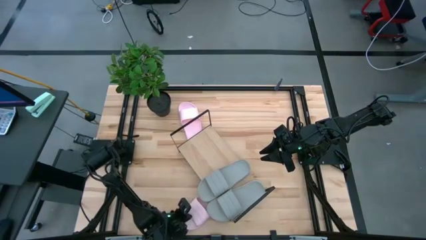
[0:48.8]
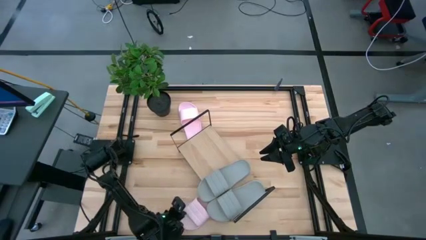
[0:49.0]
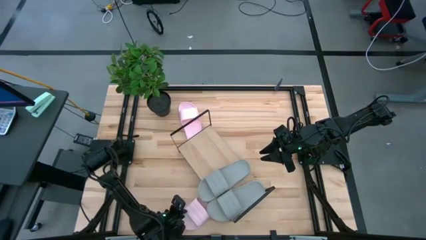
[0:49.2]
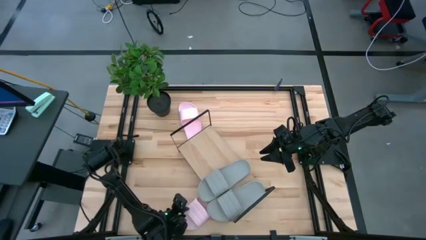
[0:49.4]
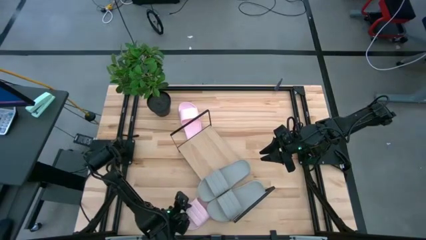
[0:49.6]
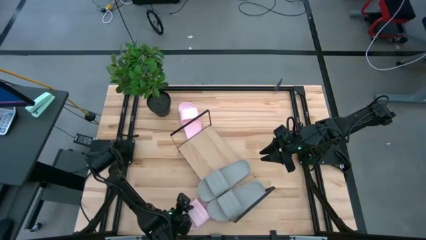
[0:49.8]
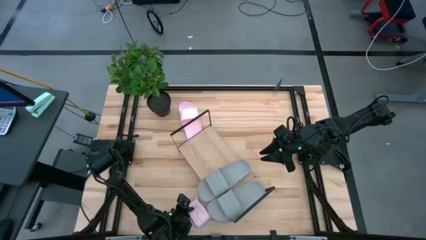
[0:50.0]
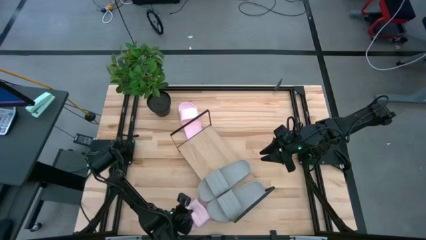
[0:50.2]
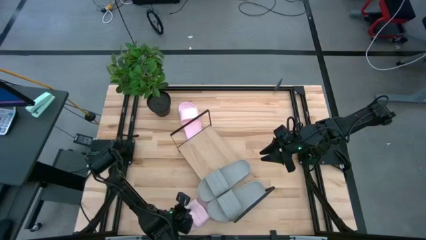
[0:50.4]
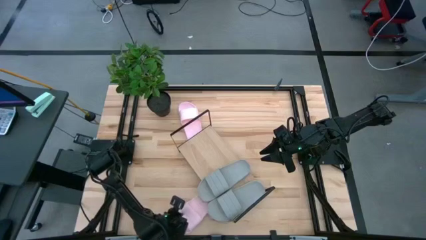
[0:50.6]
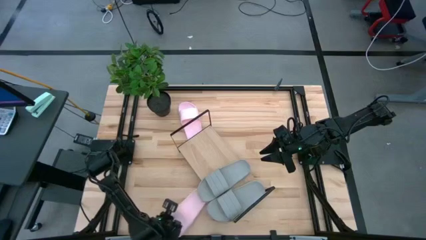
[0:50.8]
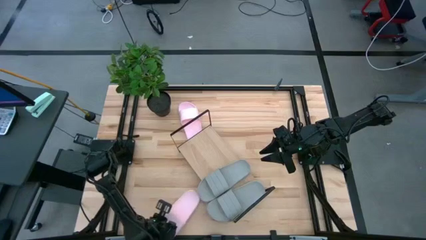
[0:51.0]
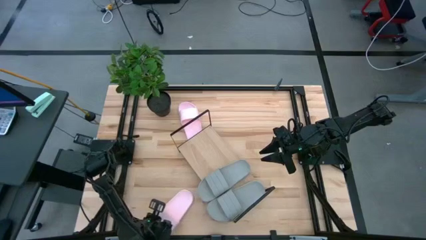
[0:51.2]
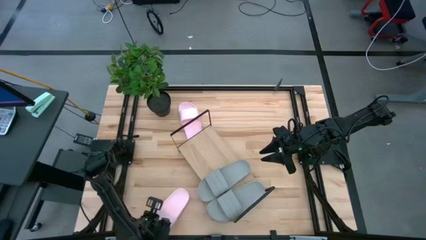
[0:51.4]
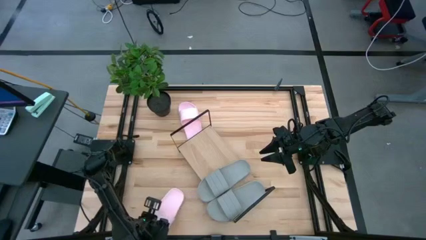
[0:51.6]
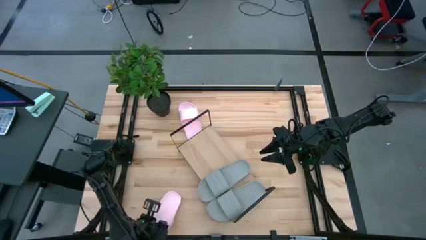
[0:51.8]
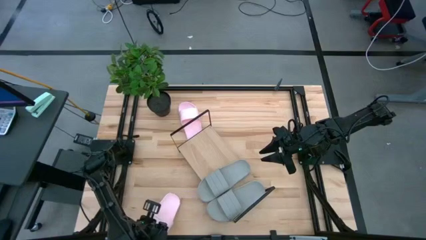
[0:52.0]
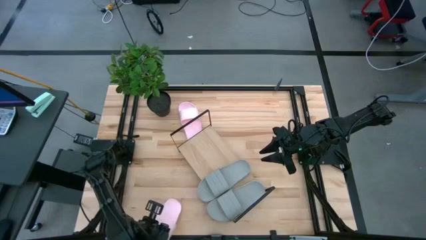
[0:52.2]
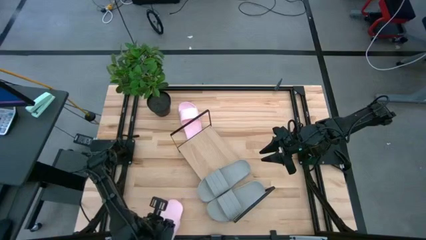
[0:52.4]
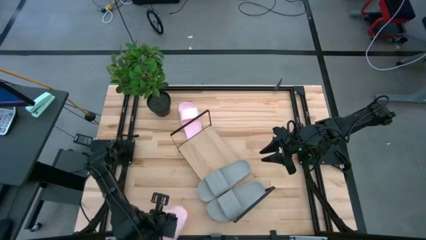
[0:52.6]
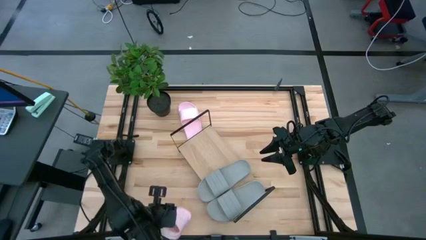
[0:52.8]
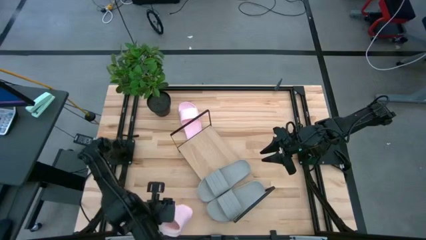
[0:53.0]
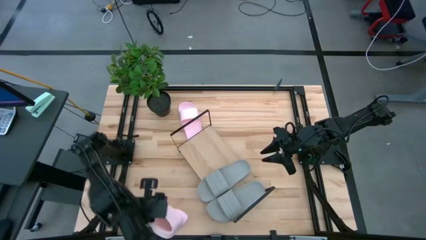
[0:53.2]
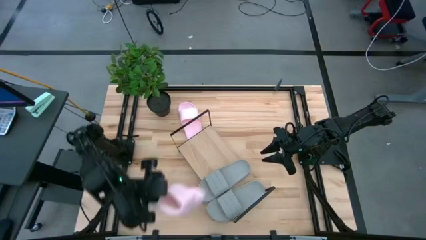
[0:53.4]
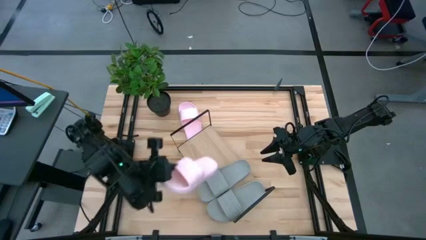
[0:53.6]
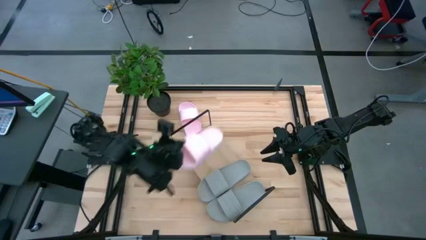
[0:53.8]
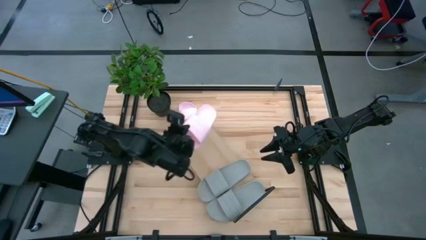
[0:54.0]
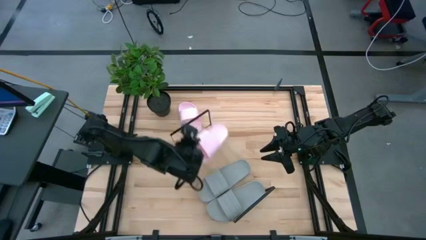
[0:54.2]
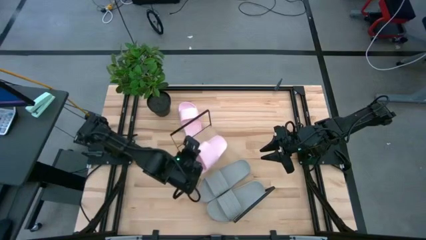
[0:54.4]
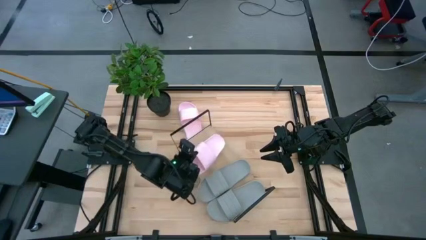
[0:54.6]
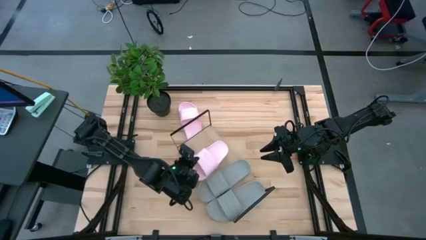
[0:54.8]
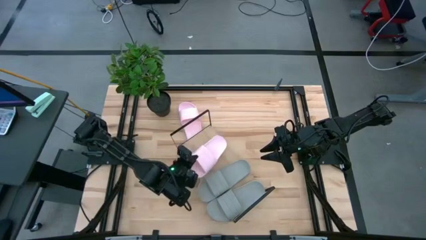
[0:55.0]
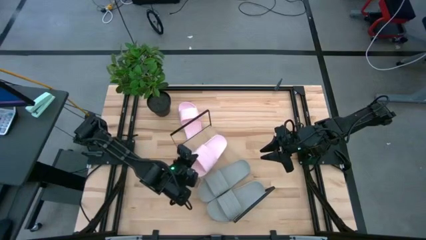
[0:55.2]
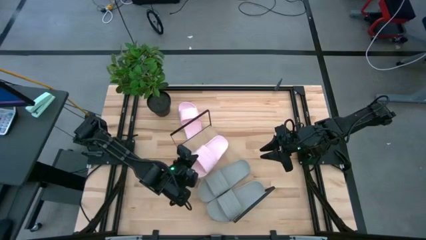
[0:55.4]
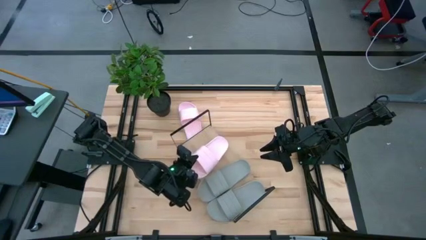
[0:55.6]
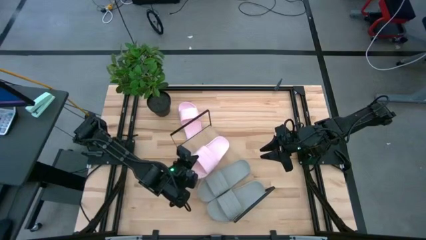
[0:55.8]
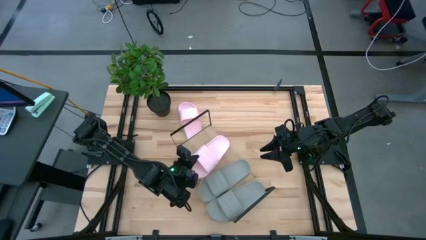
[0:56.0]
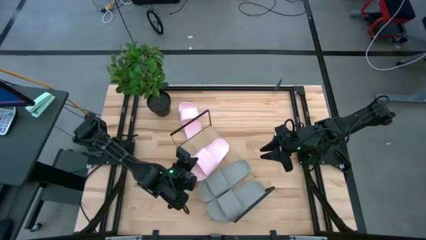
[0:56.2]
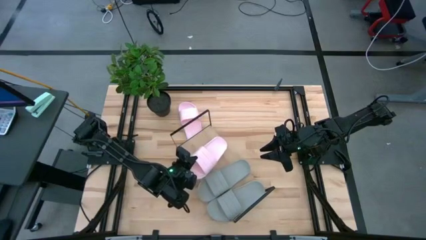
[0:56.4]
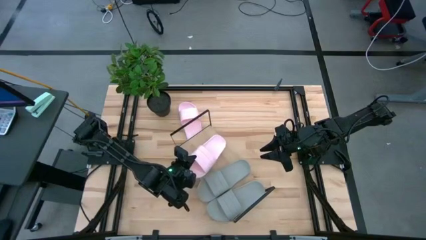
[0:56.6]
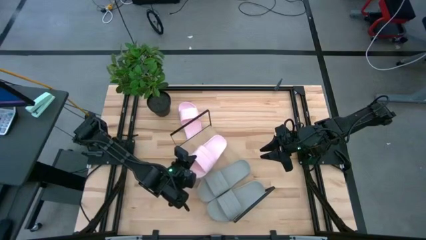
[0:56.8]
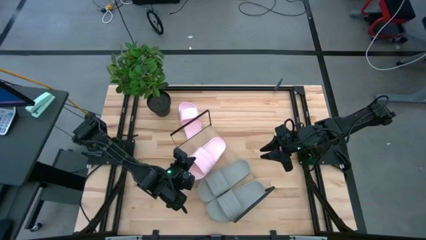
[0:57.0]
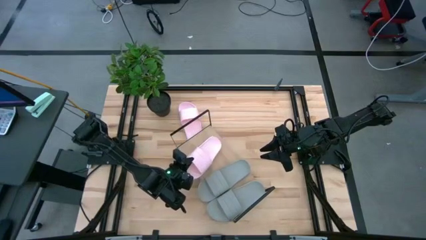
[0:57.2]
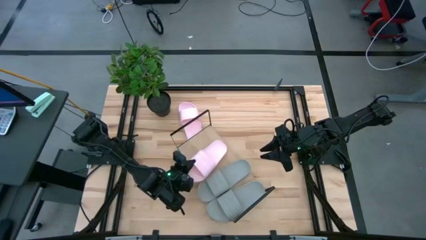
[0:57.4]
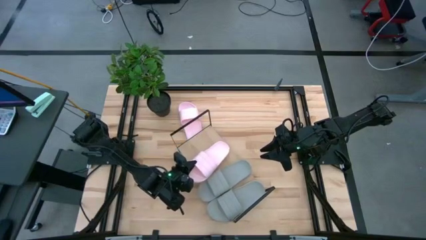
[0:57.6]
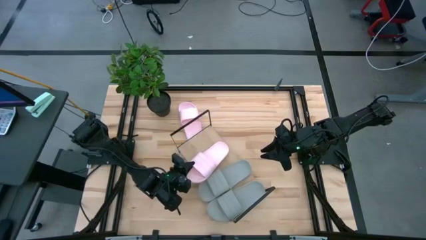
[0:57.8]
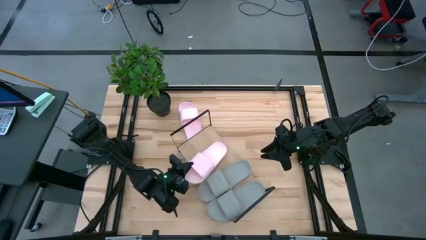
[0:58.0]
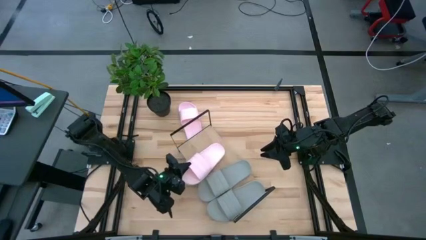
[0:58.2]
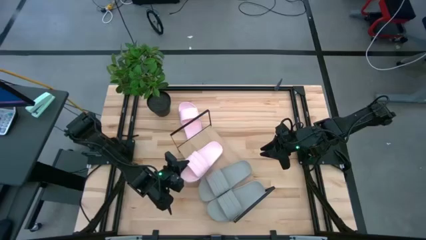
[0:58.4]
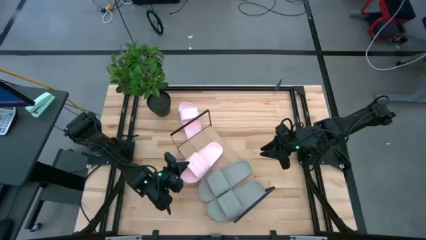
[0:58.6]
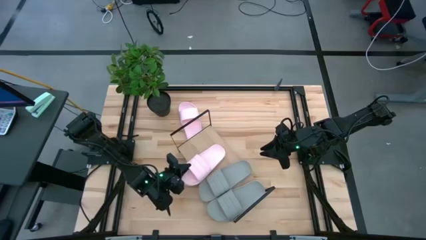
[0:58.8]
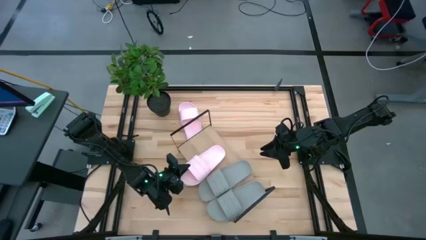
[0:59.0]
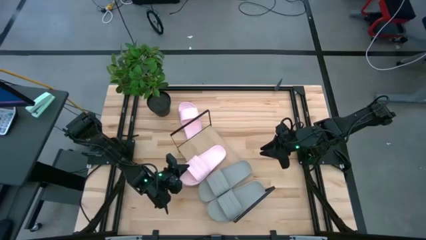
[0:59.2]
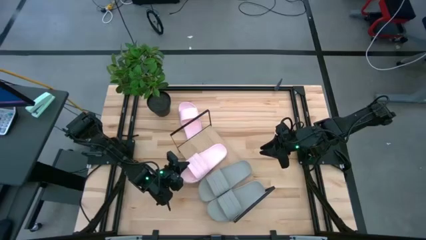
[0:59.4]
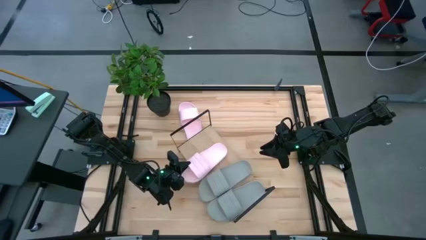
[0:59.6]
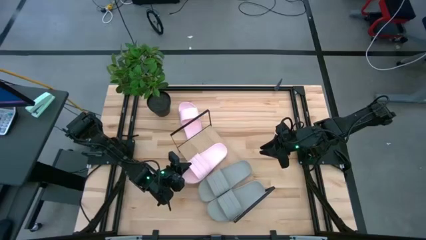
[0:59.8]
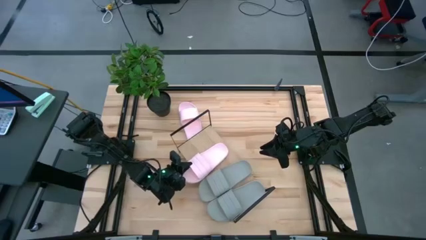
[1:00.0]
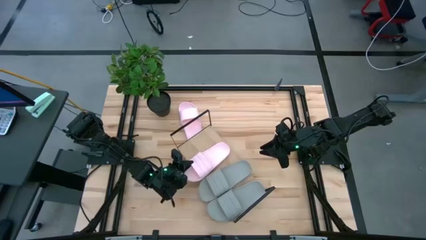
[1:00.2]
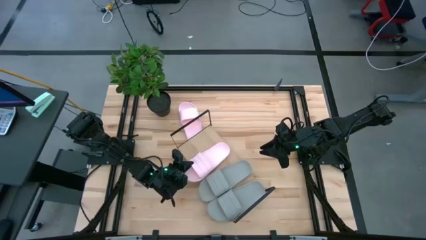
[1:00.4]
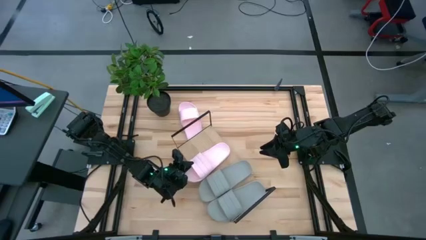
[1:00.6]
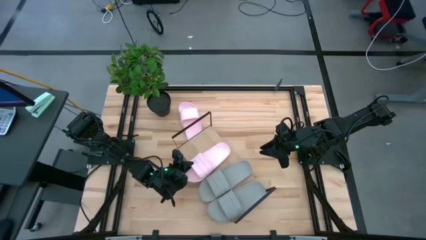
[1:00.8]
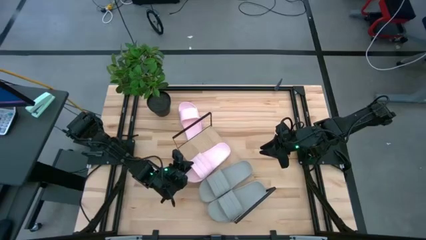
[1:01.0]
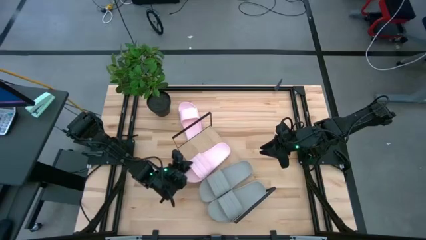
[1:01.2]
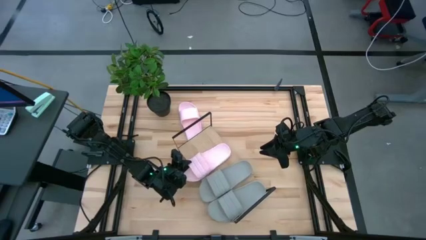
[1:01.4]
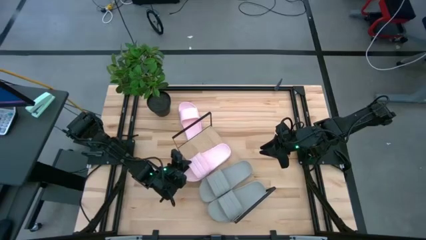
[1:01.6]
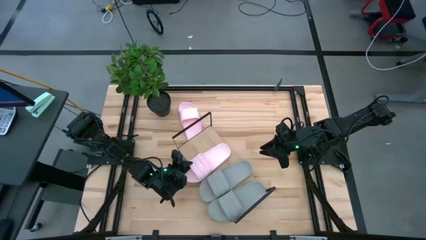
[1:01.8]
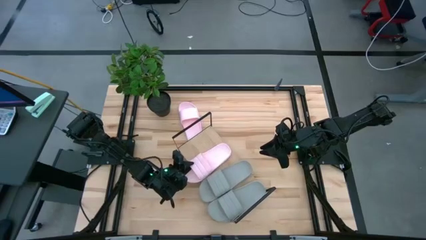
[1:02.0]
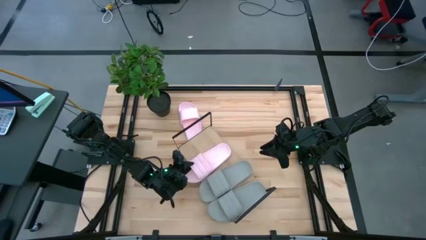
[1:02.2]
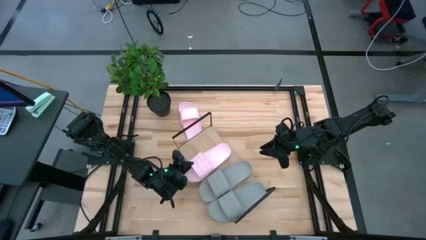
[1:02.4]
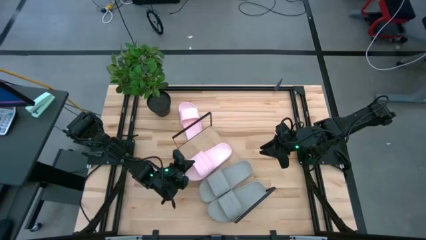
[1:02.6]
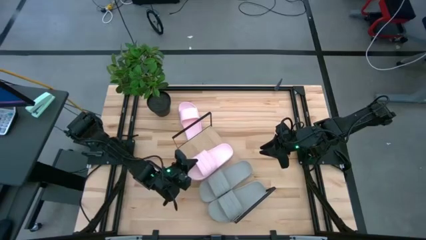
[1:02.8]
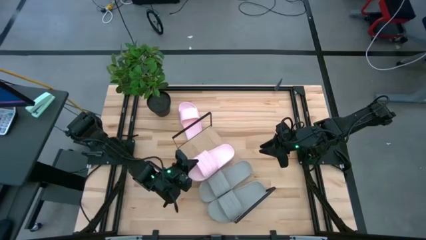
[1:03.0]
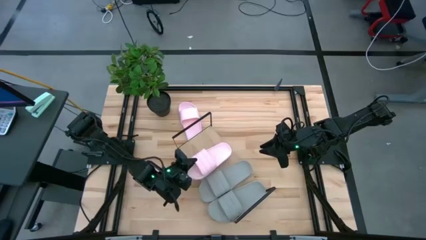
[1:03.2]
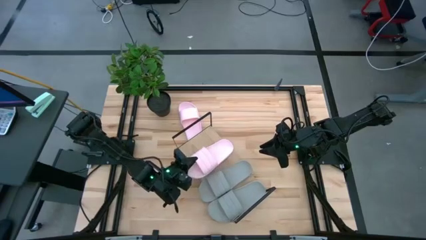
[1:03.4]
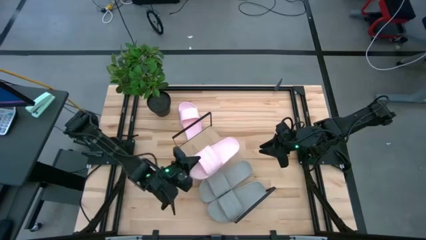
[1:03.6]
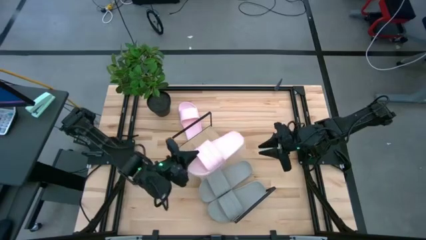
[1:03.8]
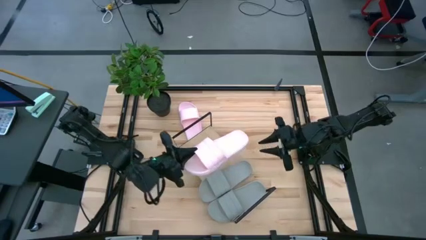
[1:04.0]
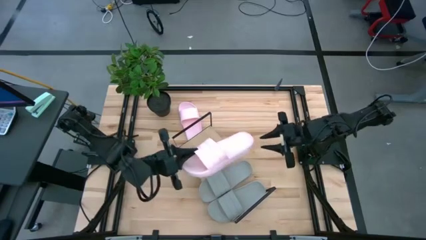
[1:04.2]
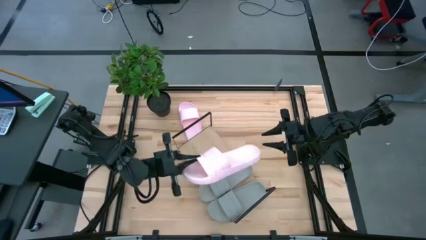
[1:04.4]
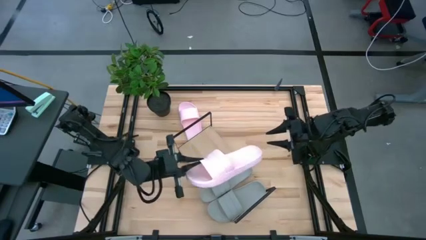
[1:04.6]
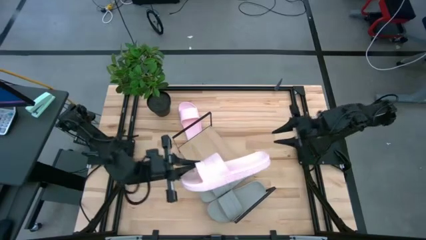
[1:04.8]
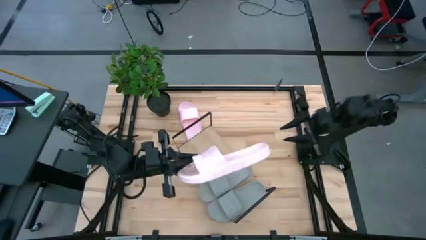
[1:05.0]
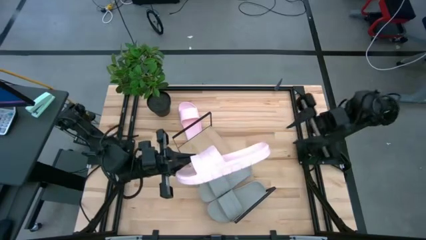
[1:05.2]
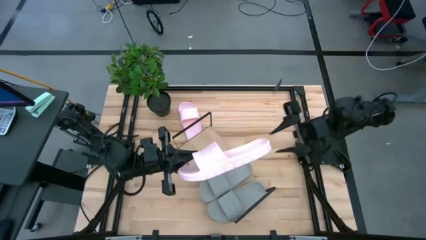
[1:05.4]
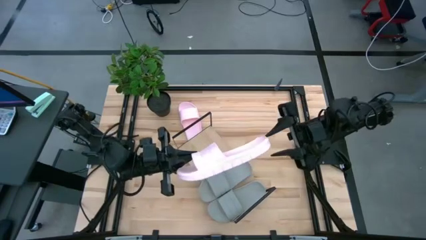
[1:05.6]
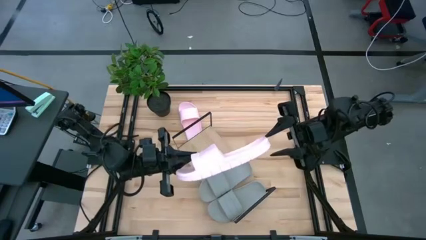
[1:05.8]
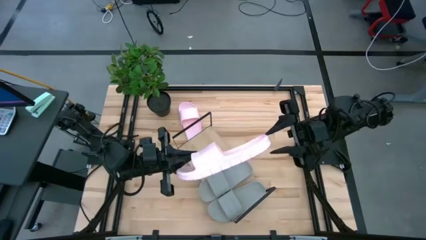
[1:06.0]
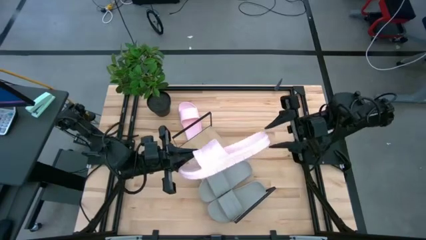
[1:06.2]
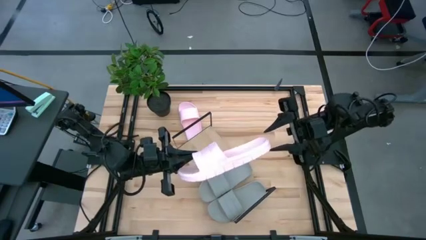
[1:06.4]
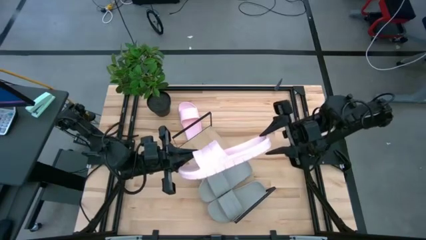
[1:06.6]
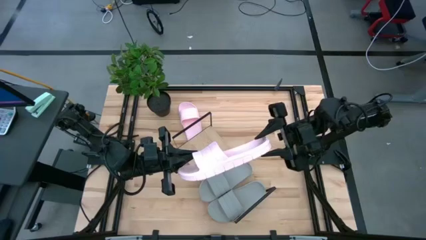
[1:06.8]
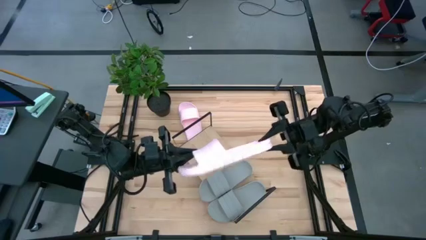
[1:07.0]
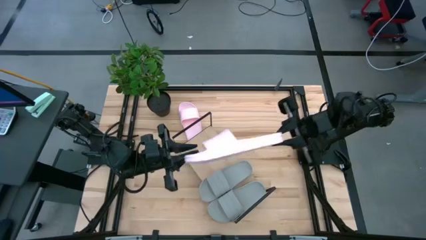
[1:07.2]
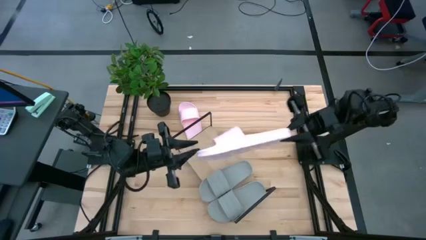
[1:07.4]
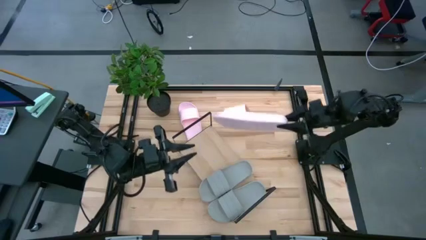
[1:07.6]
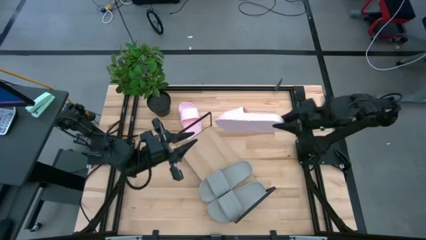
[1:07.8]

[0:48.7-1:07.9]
Task: Pick and place slides into the shelf
Put the bottom pink slide on the shelf
